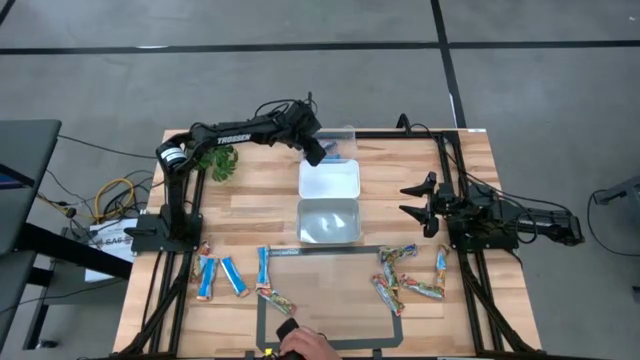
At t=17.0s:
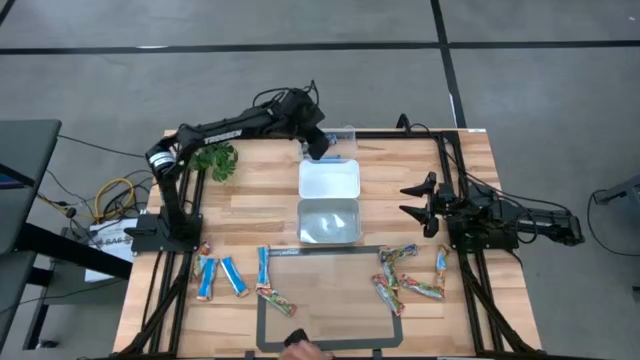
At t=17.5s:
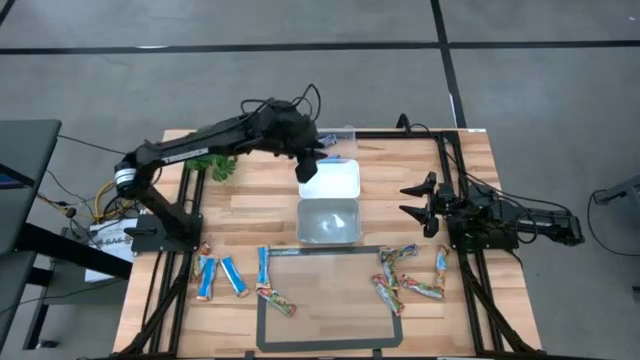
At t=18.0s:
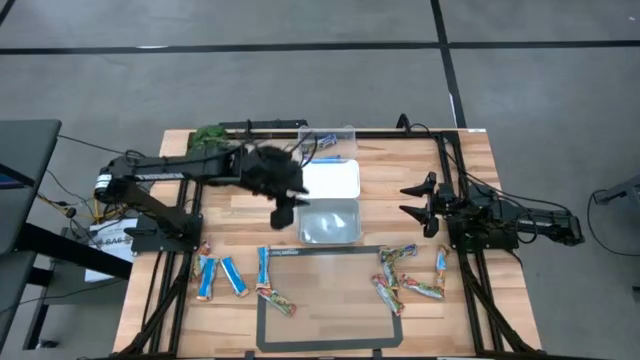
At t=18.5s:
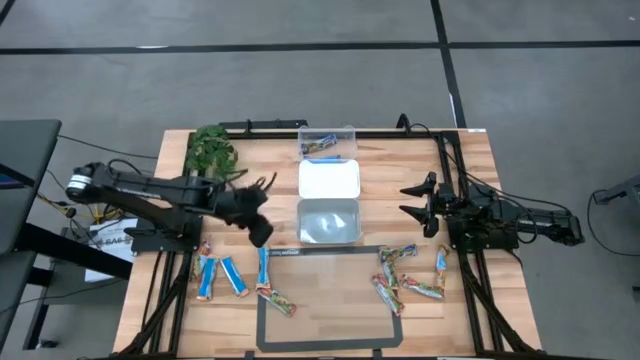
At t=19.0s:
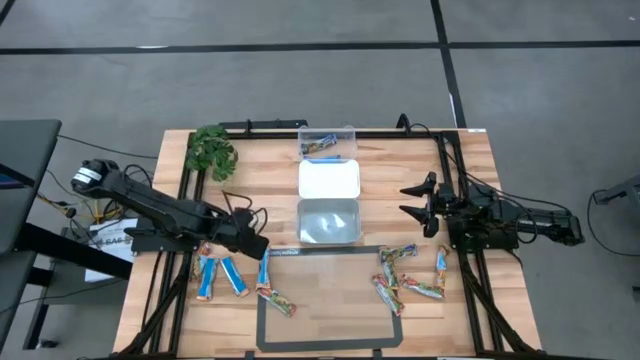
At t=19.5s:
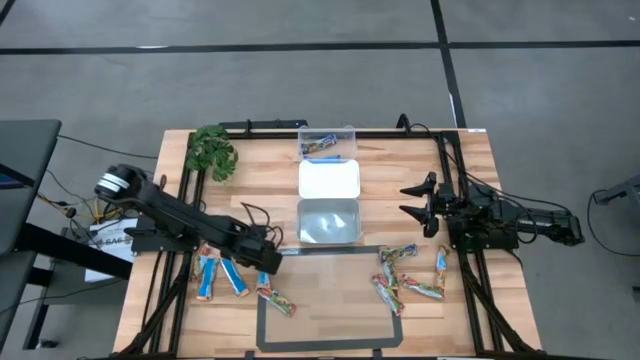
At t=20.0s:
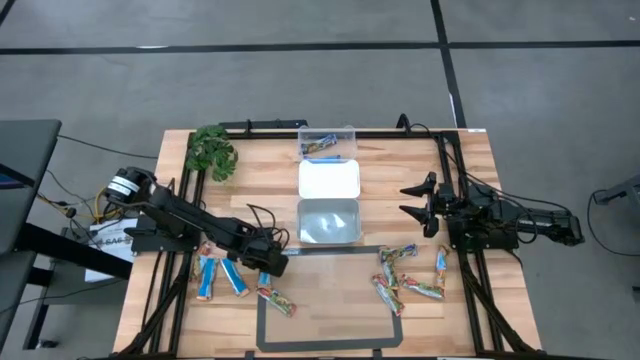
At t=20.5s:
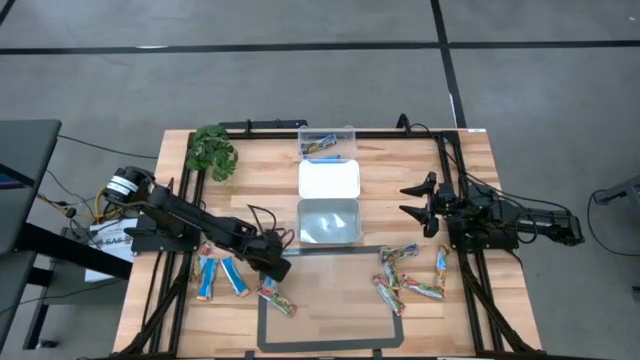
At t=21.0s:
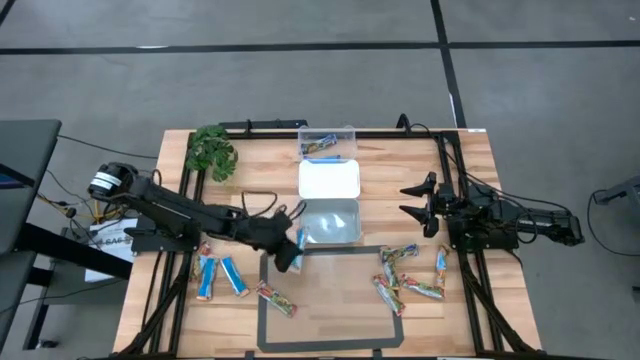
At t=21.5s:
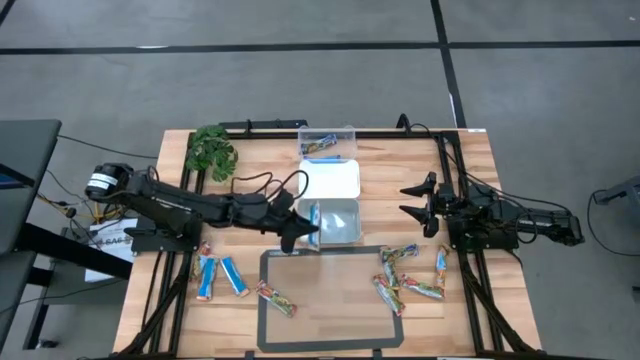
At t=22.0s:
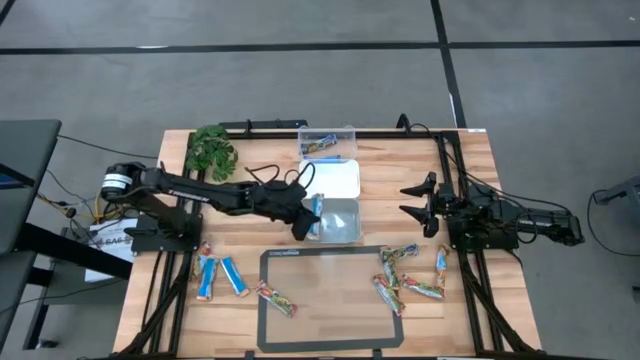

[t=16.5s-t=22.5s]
Task: Pick and place Granola Bars by type
Put the orange granola bar into the gray bin

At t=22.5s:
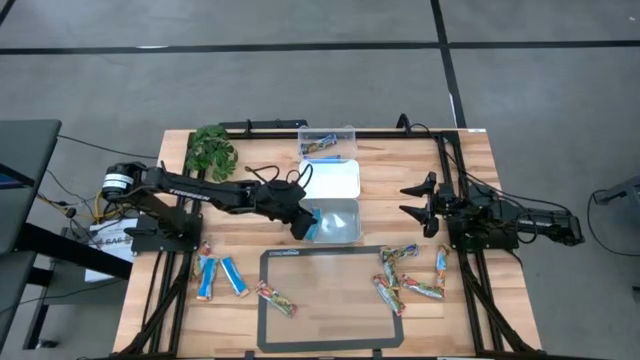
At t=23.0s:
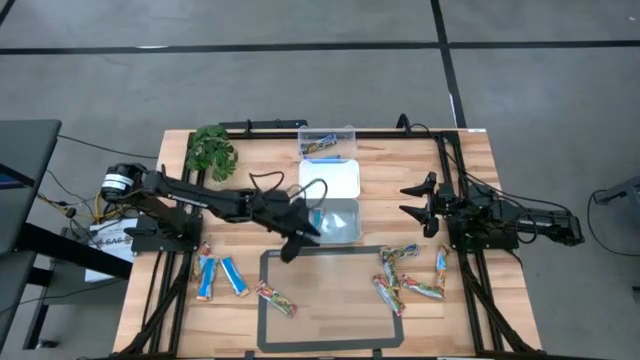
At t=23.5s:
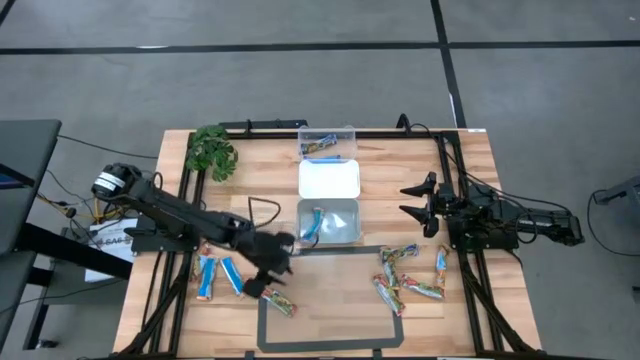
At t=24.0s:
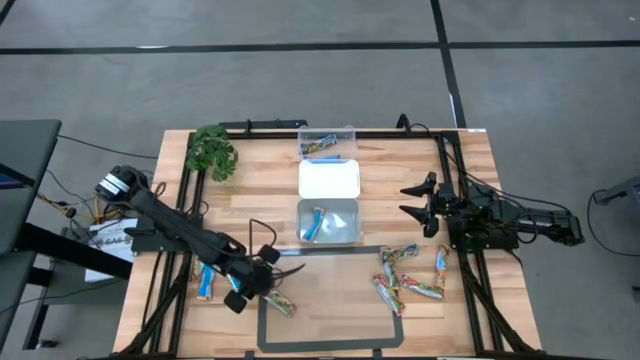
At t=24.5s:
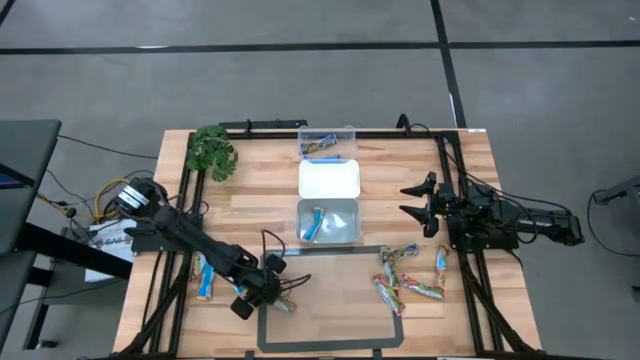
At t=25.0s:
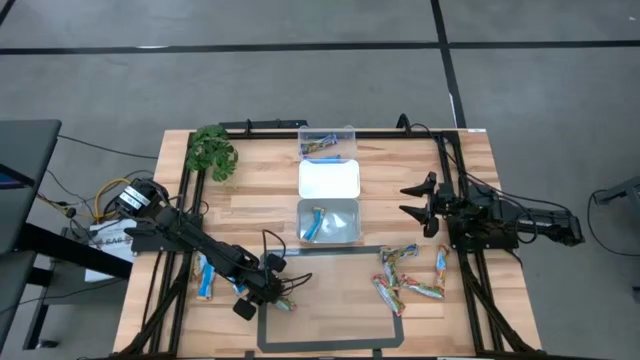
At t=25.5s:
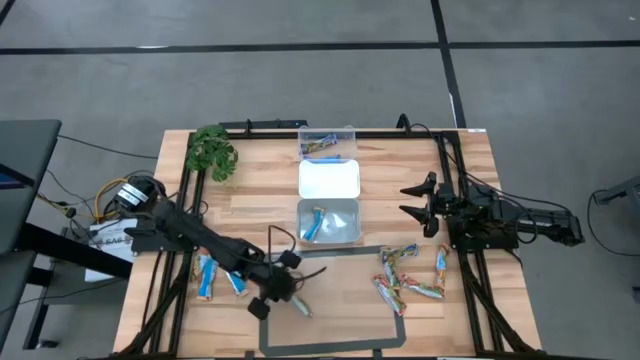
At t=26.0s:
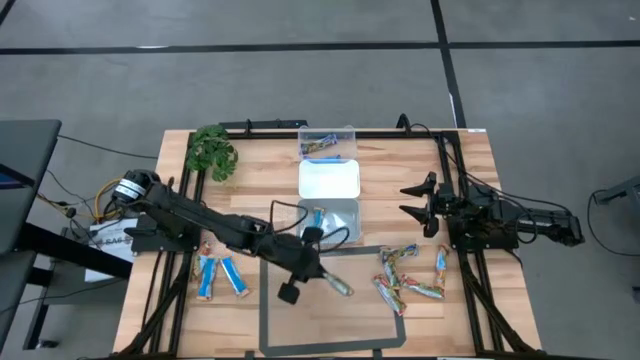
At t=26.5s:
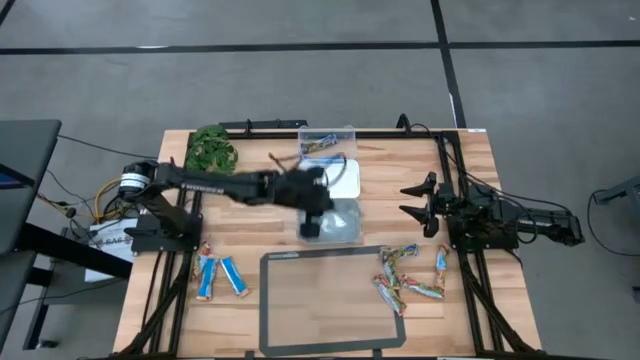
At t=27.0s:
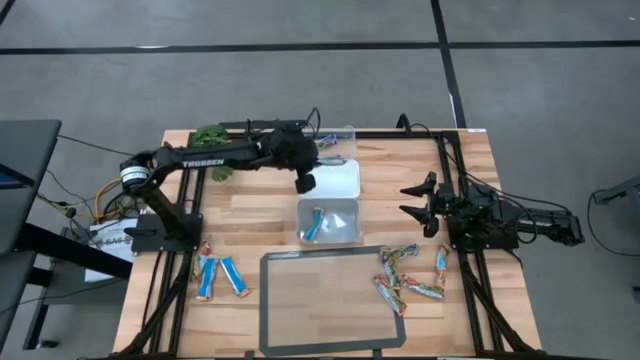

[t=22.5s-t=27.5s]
Put the red granola bar into the white bin

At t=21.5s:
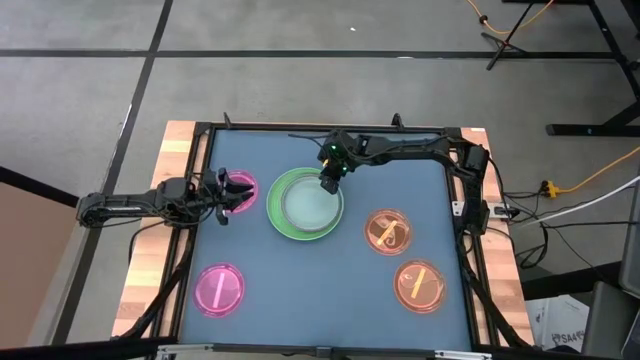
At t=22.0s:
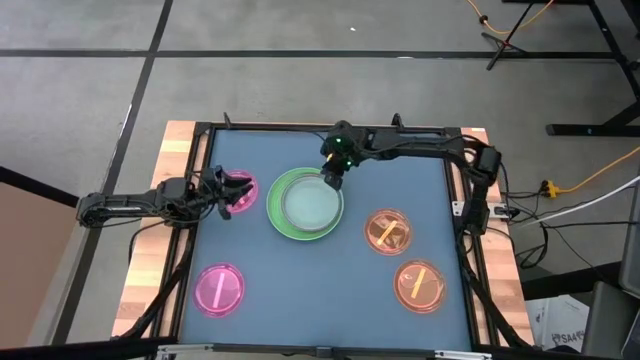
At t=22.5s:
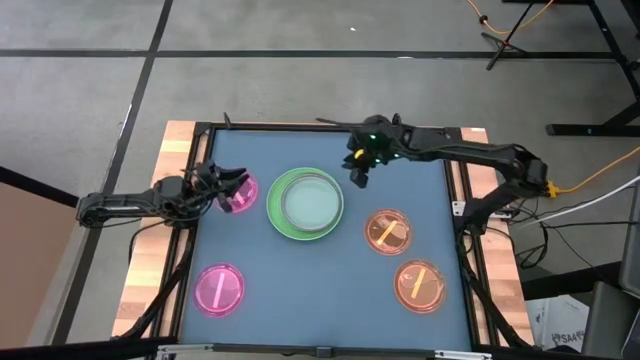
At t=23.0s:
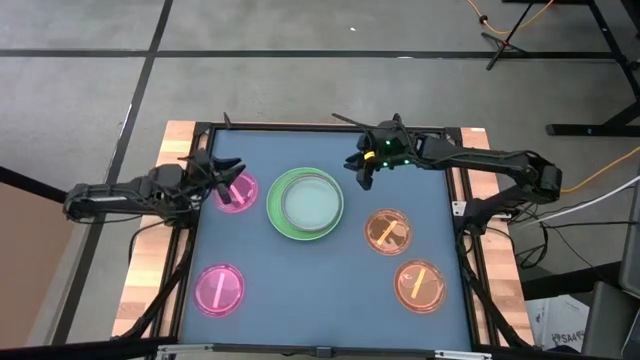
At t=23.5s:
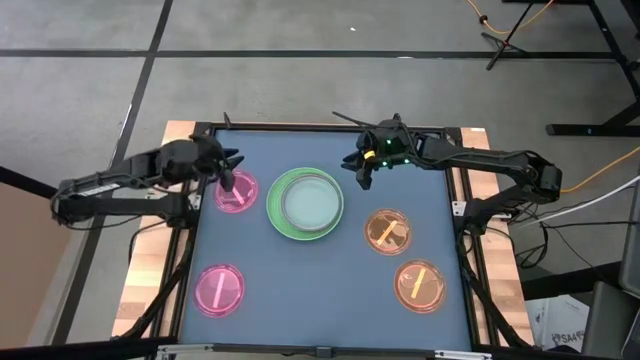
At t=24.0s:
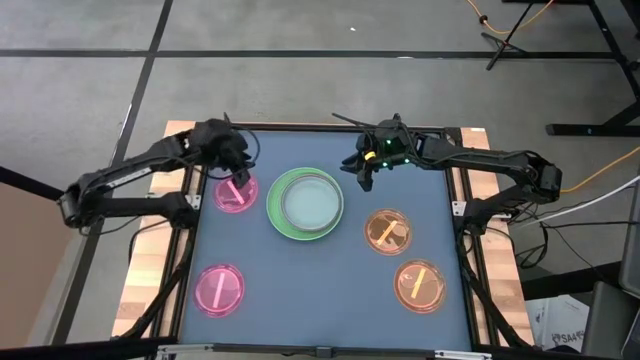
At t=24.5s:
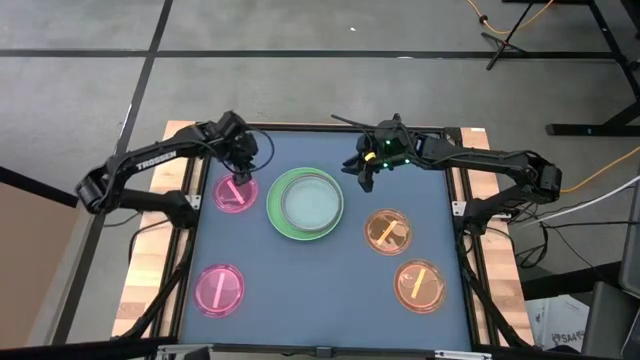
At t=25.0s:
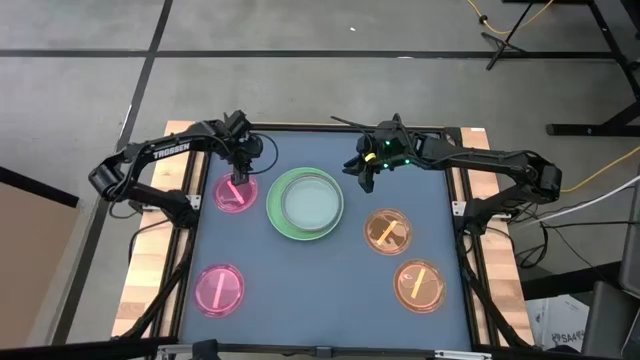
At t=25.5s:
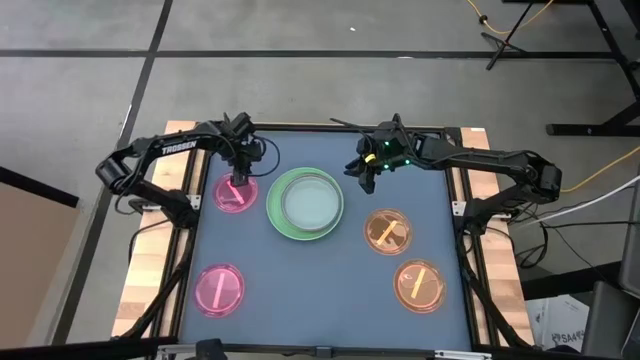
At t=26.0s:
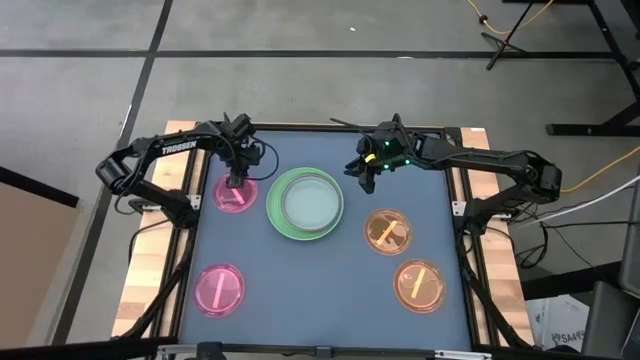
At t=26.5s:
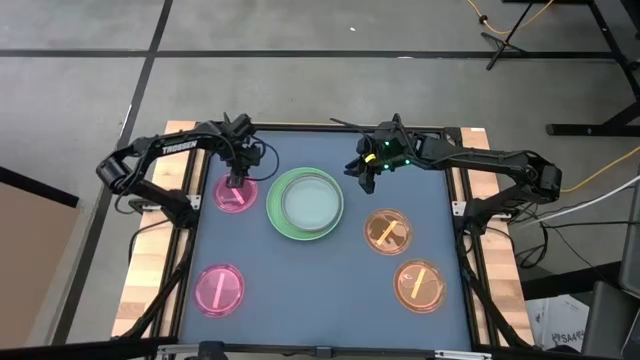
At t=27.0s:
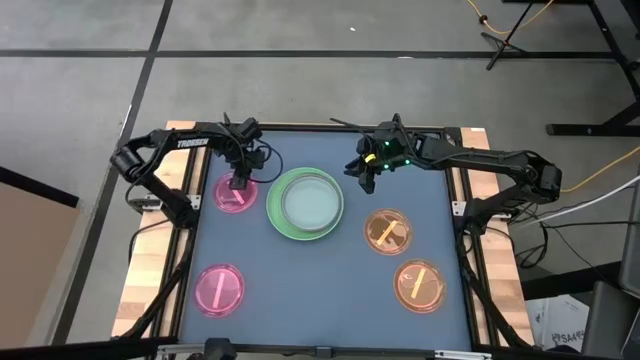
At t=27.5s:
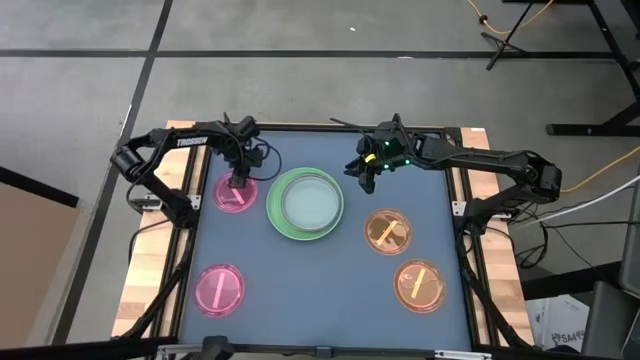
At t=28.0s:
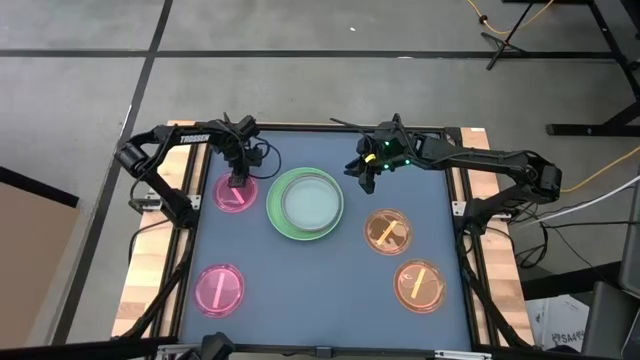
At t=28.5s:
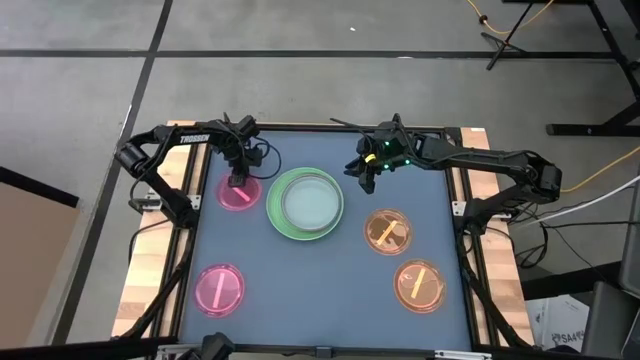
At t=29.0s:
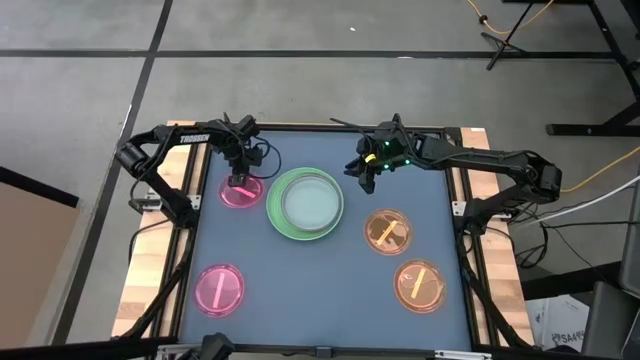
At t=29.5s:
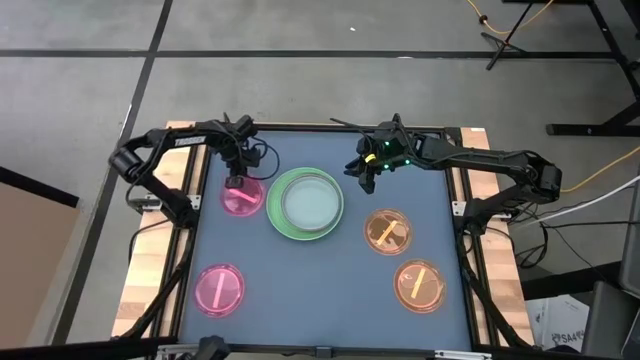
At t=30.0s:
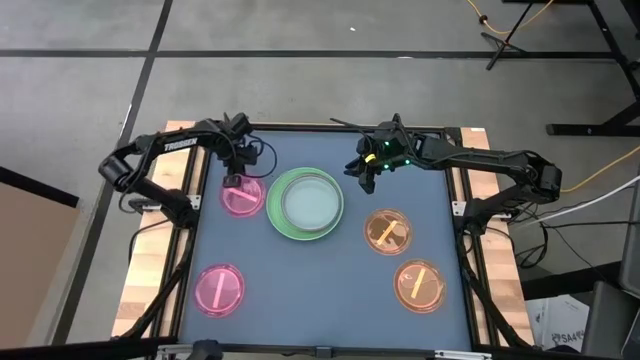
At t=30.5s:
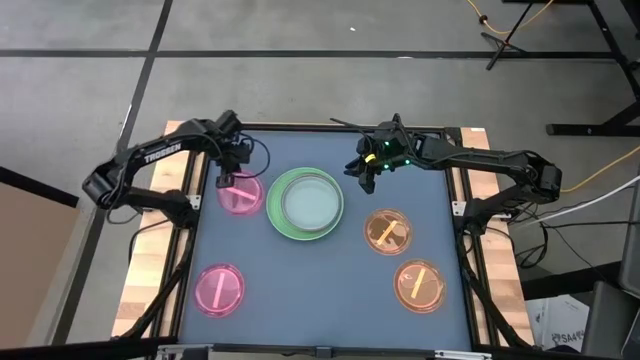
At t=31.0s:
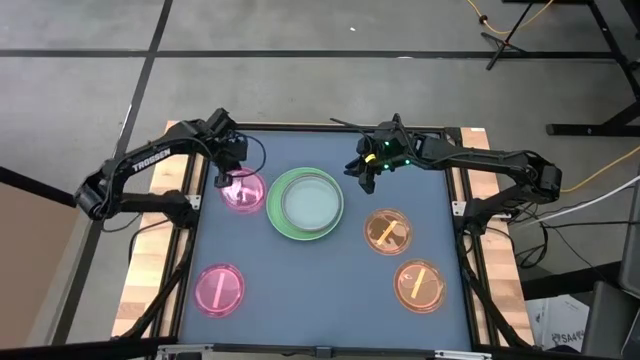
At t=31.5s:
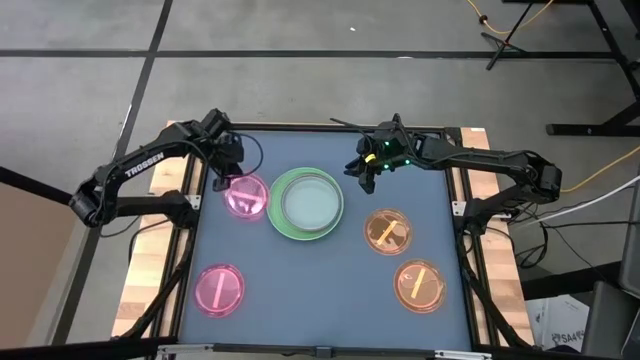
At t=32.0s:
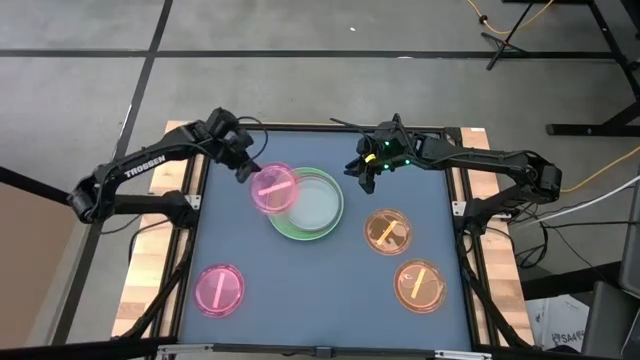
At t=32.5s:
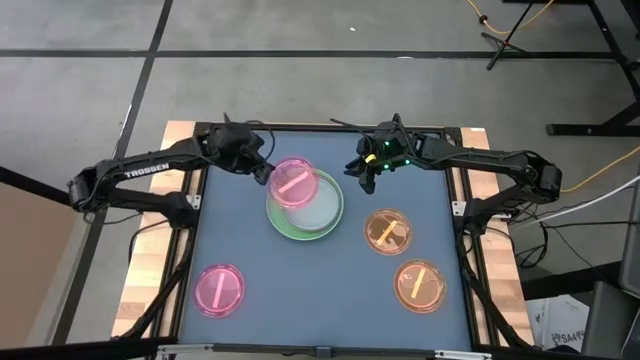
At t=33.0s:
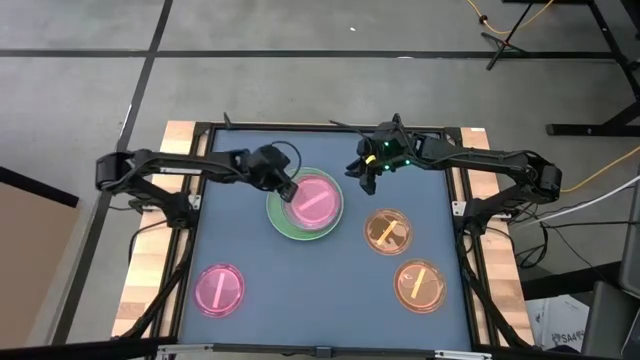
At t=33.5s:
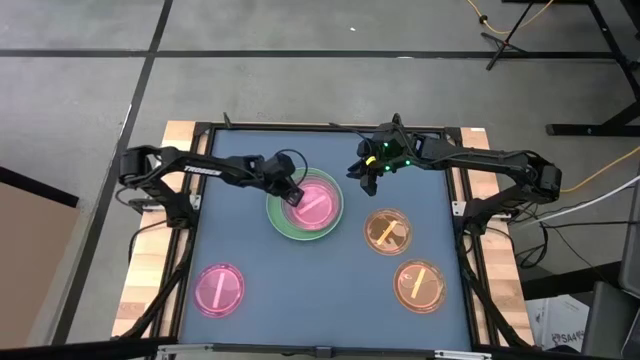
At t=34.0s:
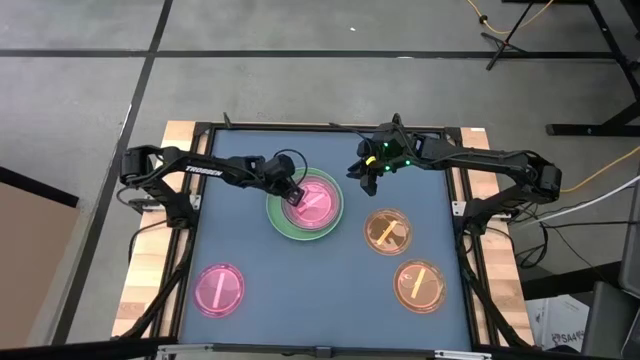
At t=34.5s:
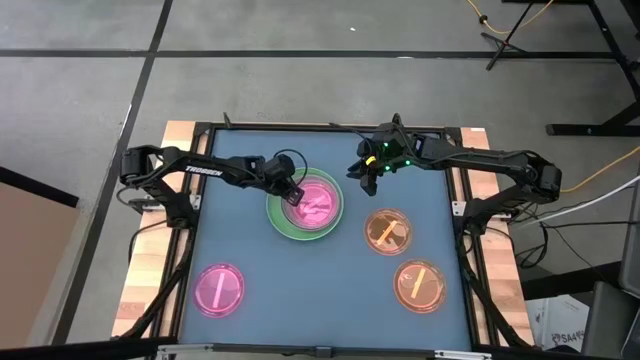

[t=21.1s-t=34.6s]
Task: Stack plastic plates
Stack the top transparent pink plate on the blue plate
